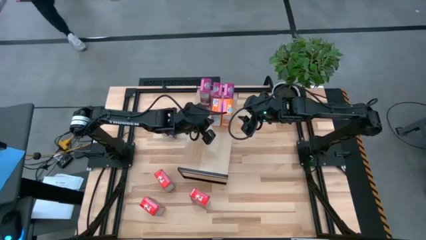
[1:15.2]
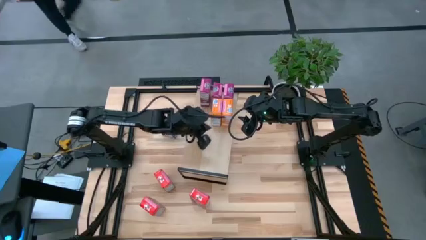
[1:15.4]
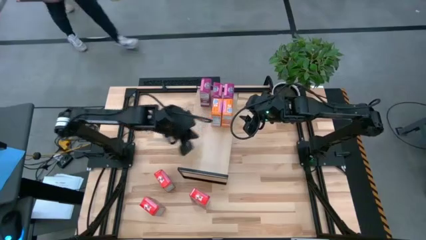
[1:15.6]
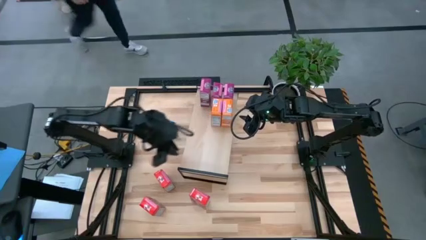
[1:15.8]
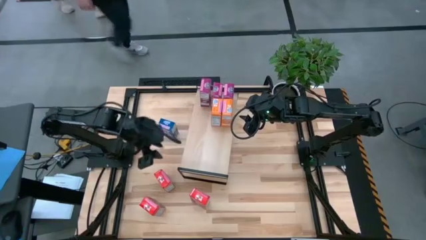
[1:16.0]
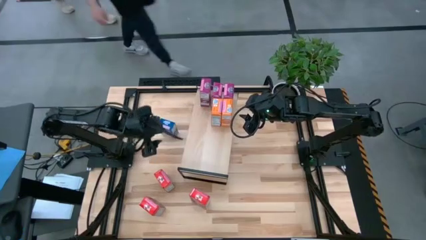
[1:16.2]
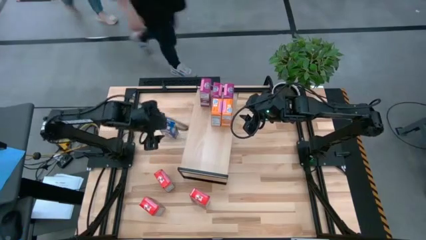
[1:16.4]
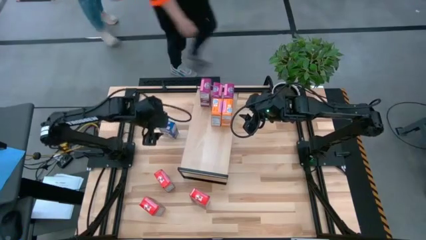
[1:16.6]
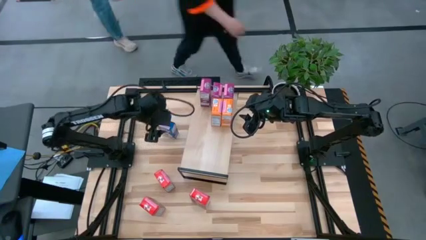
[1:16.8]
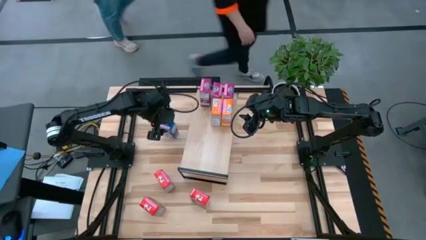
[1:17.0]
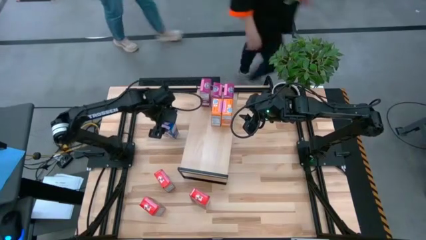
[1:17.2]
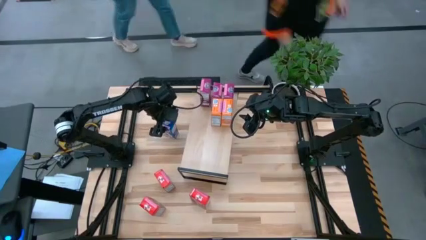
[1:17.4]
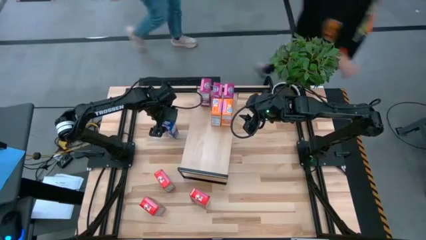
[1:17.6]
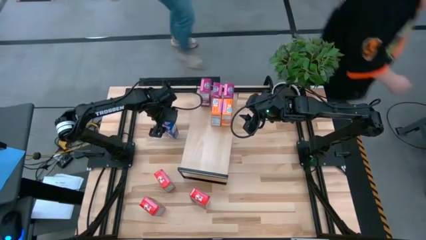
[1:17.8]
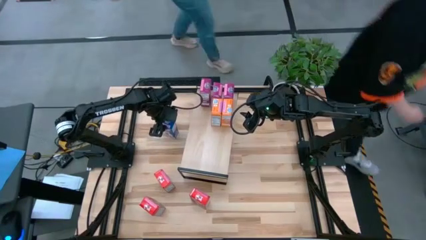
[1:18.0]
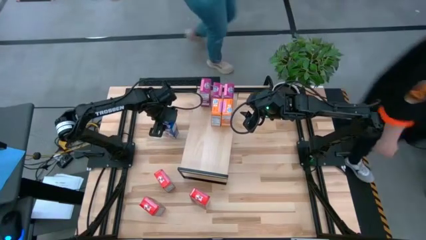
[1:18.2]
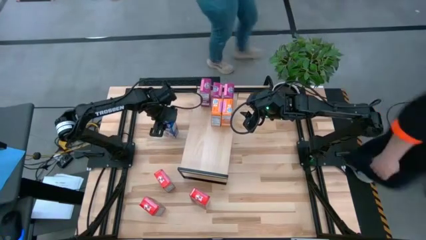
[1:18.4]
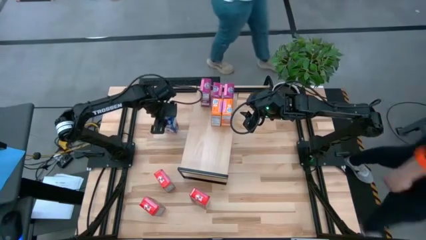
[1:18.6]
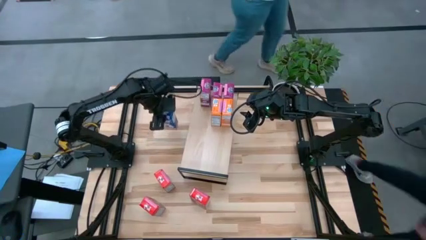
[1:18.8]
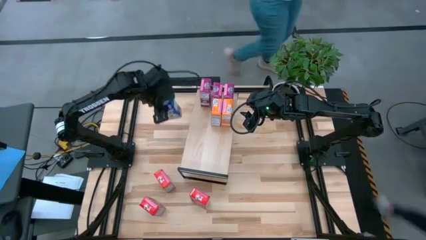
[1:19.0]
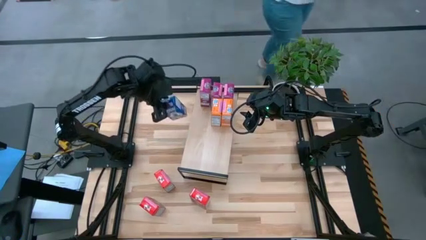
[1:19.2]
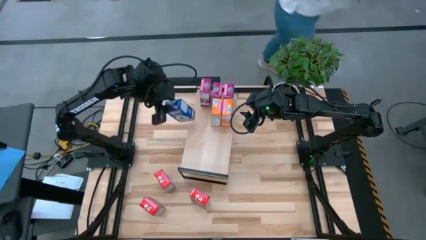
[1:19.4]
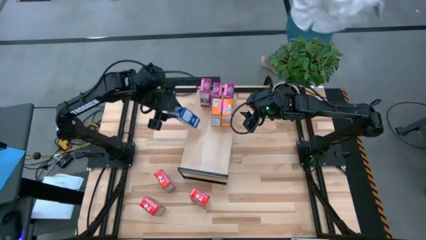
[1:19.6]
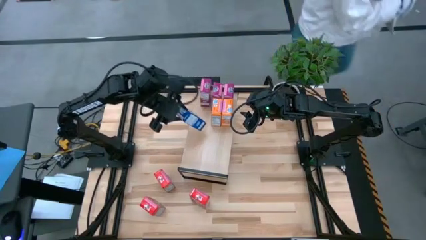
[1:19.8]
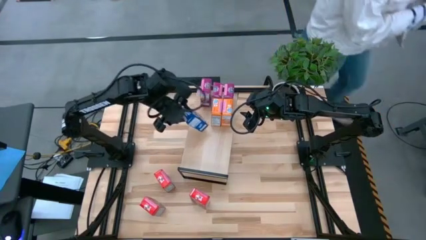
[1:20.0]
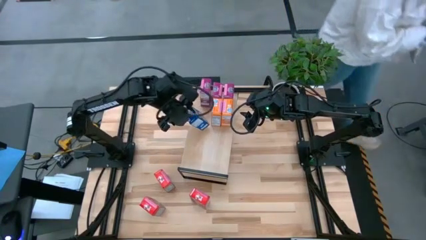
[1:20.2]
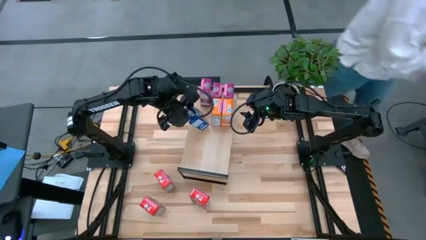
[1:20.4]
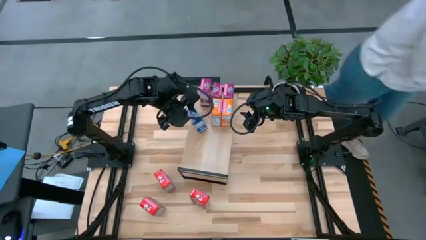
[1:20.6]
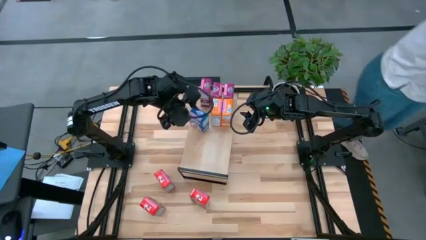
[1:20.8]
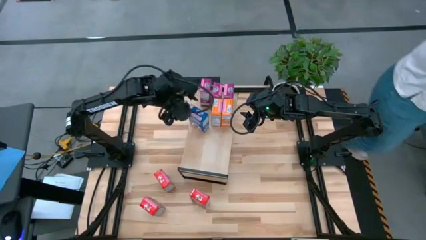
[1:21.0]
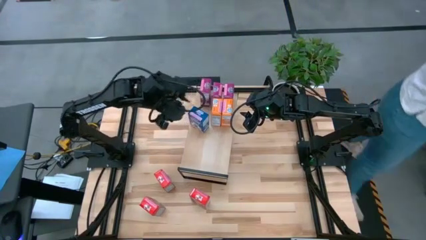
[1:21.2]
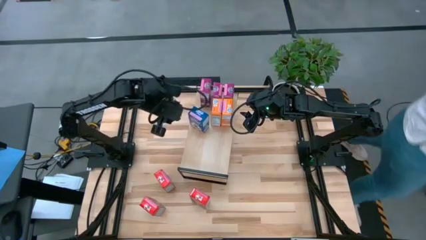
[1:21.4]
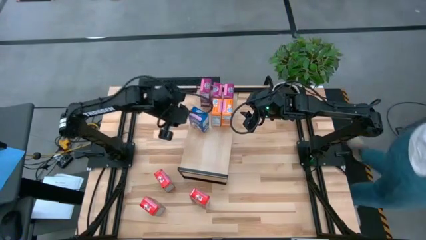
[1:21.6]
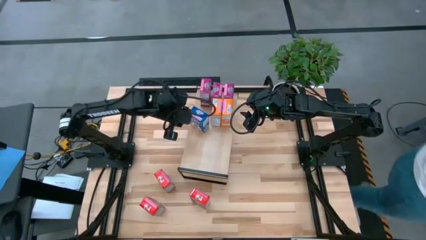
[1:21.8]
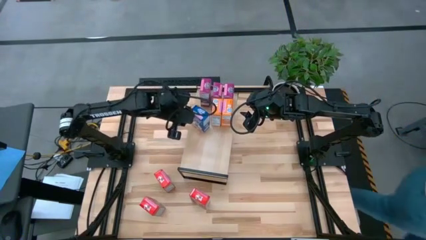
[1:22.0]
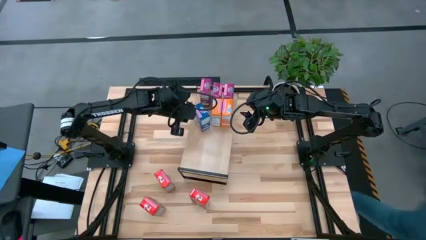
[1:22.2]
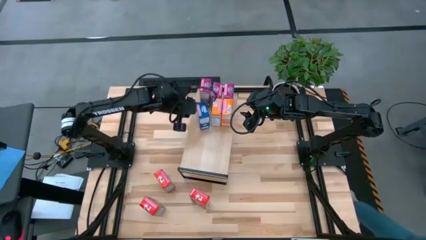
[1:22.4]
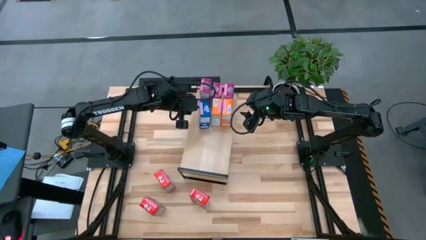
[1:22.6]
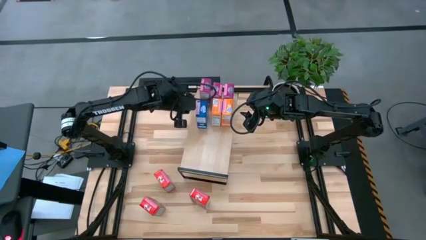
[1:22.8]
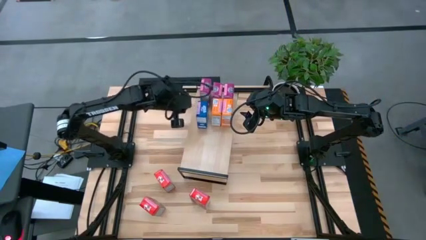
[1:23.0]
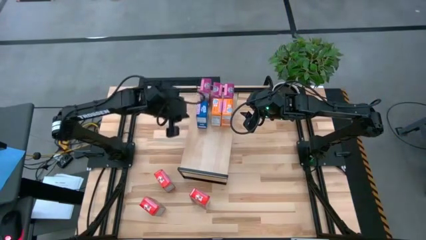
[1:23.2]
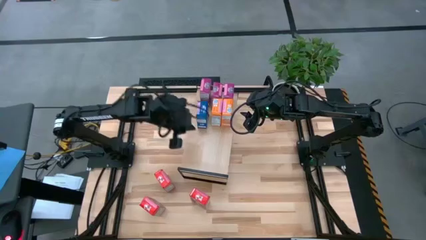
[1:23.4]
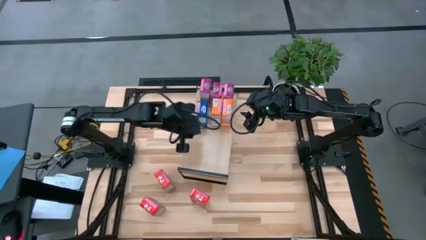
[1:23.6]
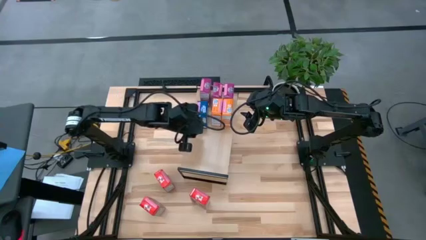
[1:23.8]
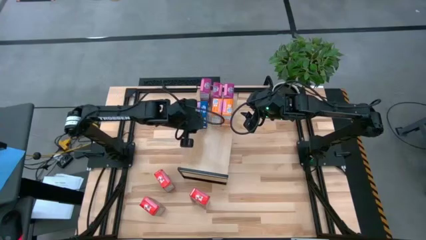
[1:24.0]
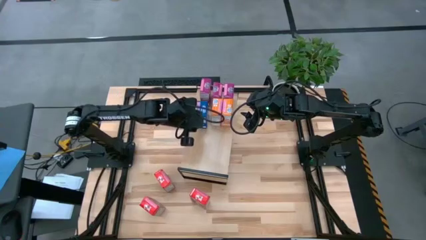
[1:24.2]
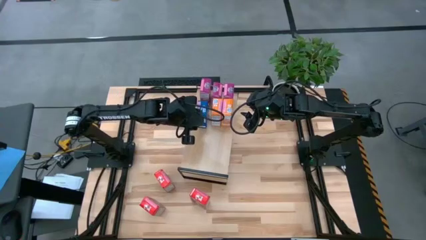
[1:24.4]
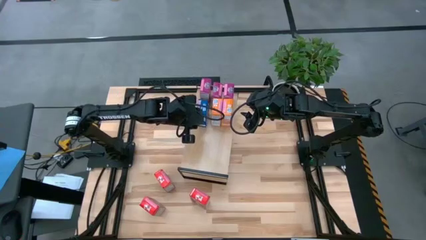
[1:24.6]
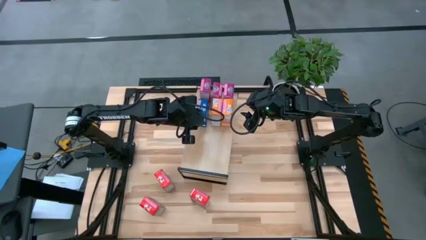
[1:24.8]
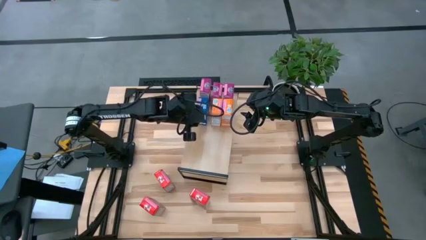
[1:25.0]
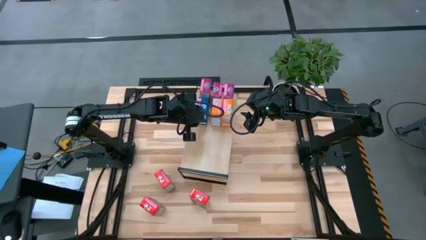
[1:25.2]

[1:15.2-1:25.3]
Task: Stack cereal on shelf
Put the blue cereal box on the shelf
